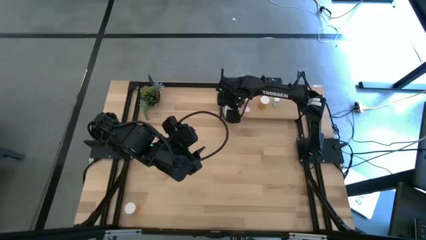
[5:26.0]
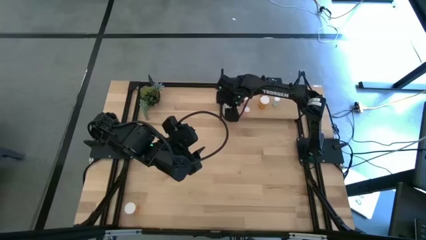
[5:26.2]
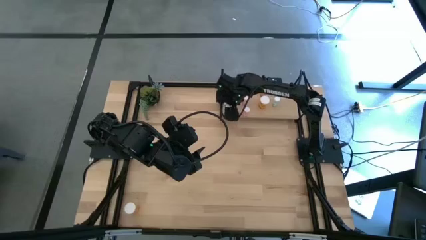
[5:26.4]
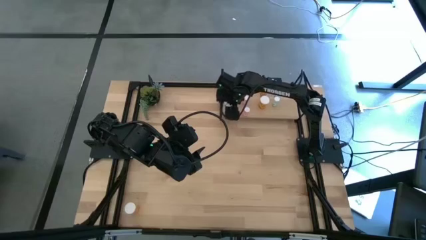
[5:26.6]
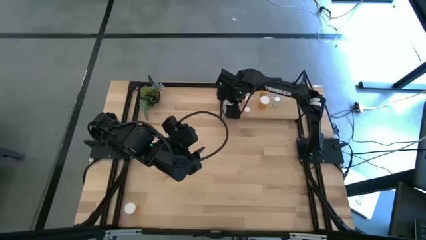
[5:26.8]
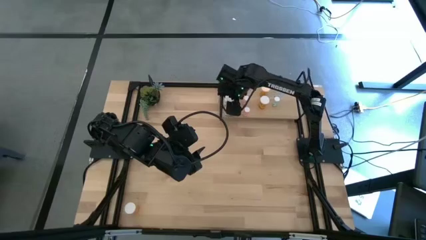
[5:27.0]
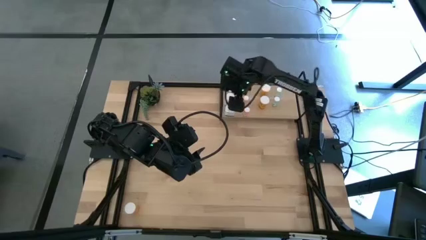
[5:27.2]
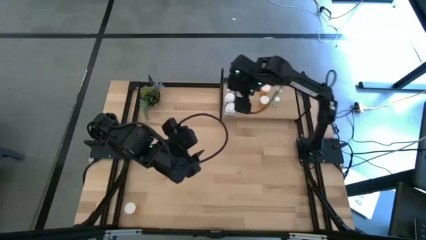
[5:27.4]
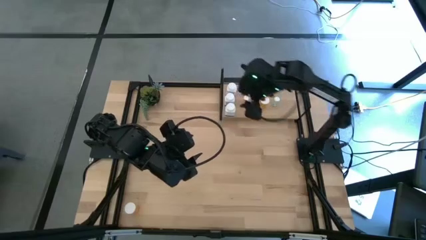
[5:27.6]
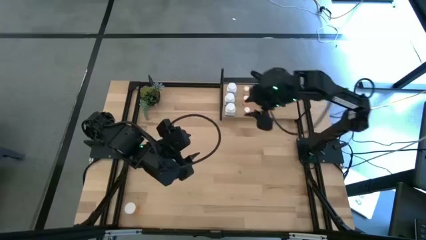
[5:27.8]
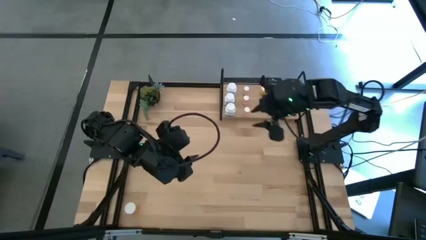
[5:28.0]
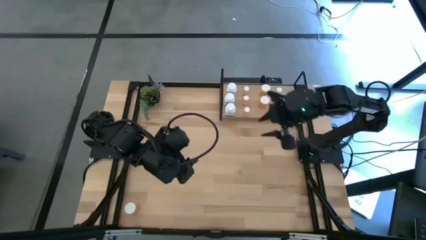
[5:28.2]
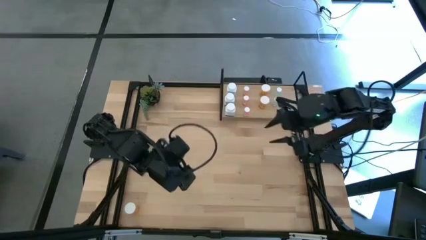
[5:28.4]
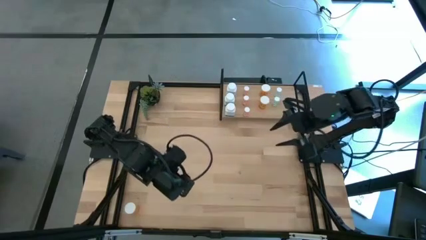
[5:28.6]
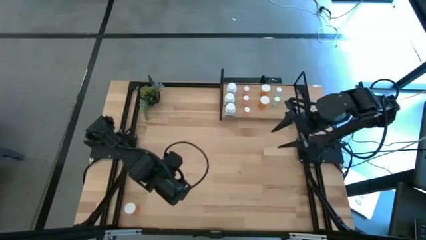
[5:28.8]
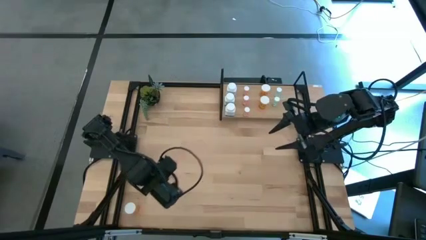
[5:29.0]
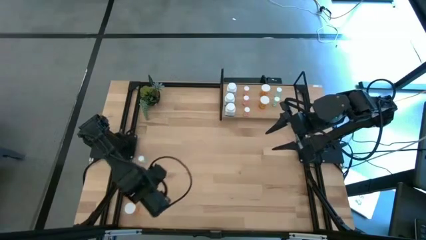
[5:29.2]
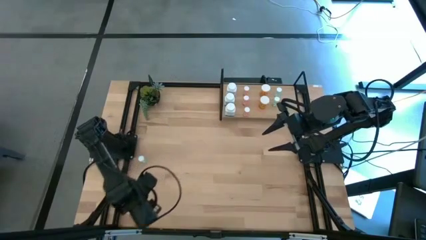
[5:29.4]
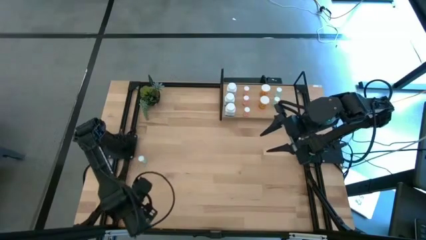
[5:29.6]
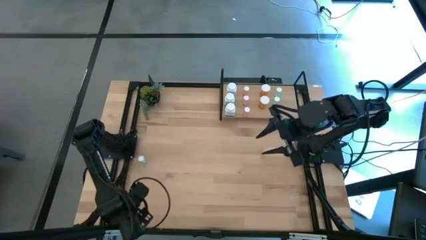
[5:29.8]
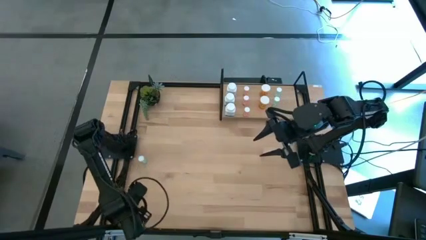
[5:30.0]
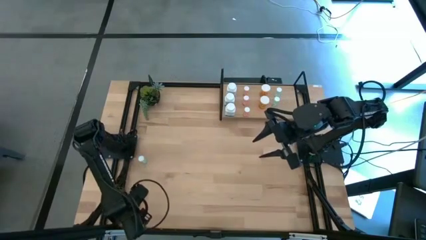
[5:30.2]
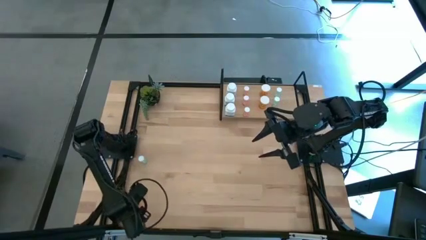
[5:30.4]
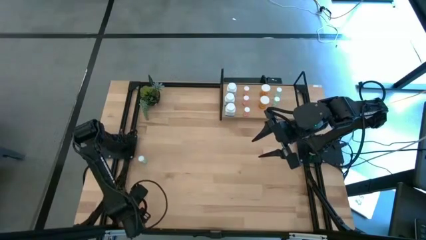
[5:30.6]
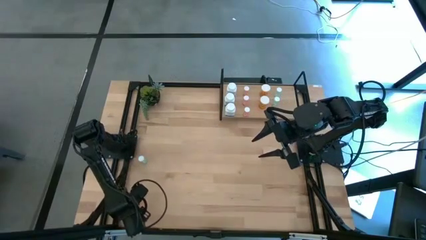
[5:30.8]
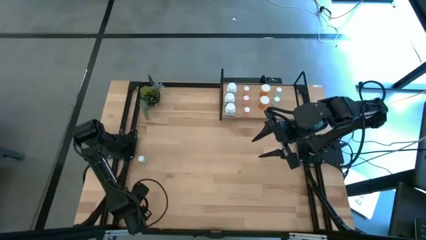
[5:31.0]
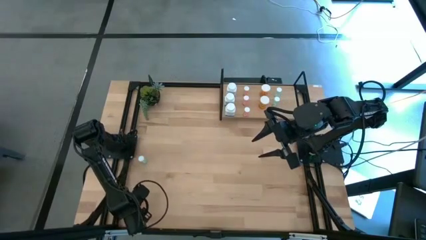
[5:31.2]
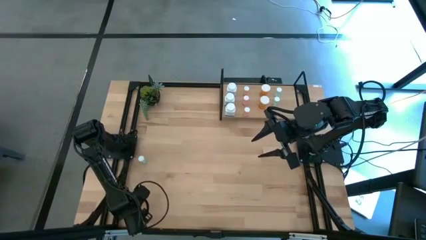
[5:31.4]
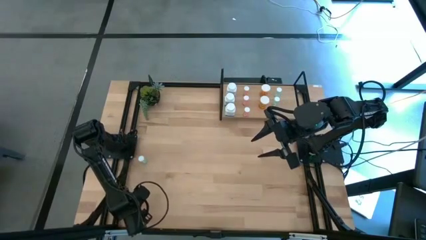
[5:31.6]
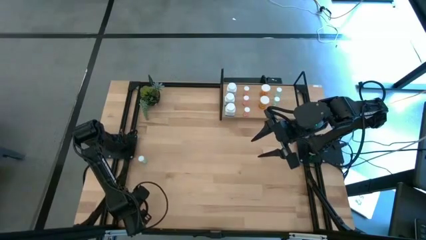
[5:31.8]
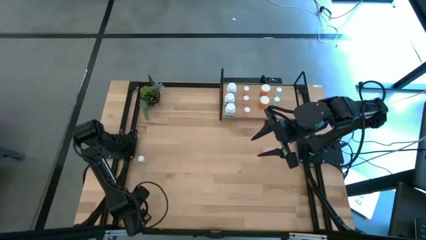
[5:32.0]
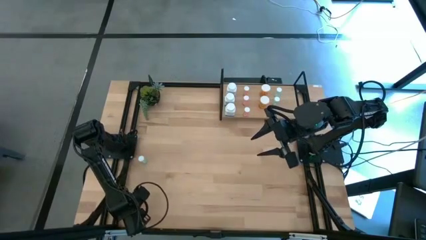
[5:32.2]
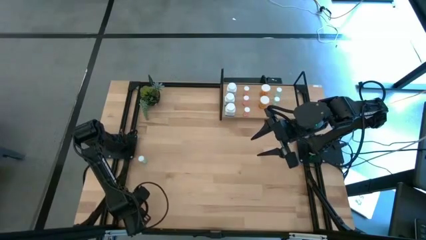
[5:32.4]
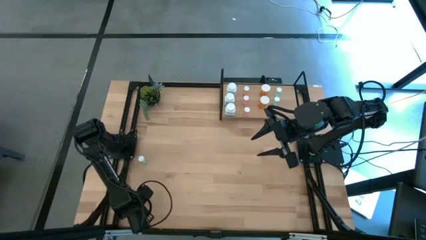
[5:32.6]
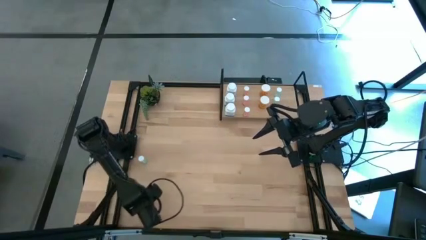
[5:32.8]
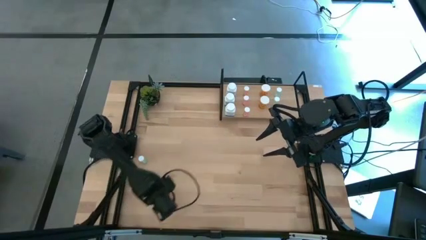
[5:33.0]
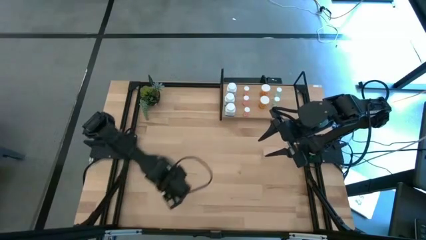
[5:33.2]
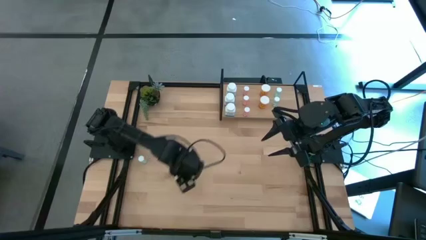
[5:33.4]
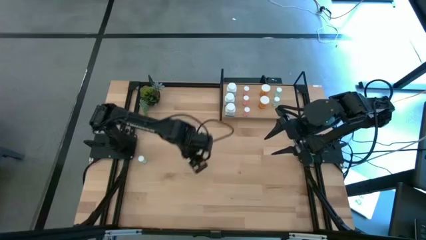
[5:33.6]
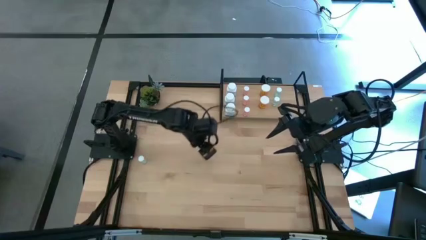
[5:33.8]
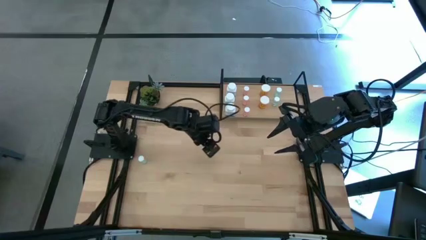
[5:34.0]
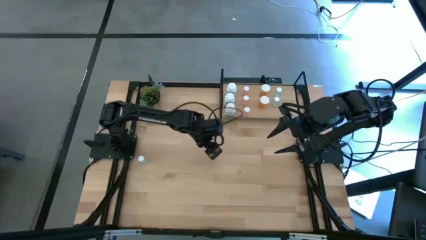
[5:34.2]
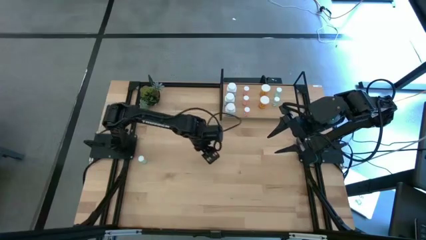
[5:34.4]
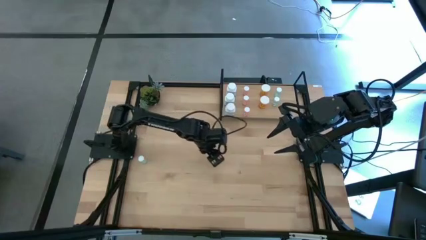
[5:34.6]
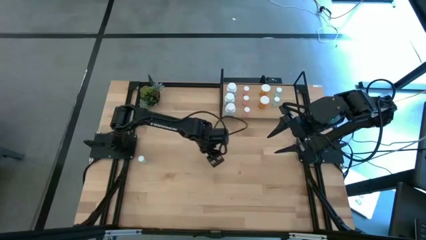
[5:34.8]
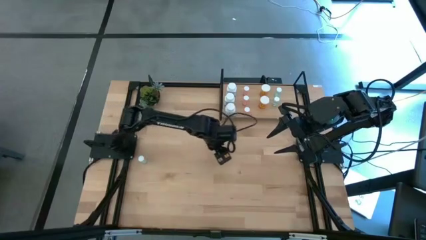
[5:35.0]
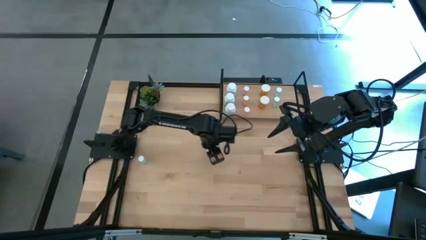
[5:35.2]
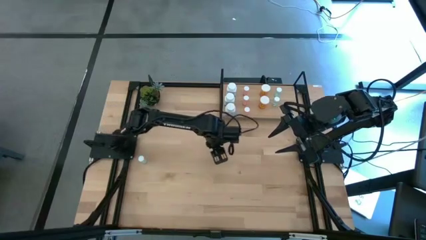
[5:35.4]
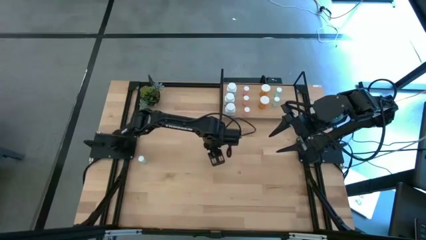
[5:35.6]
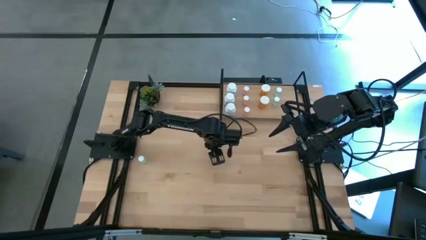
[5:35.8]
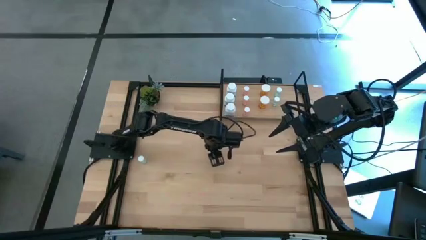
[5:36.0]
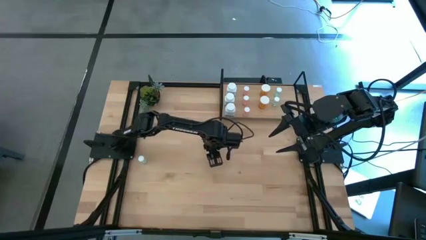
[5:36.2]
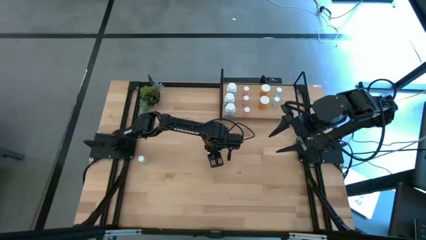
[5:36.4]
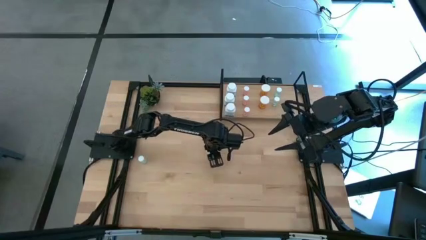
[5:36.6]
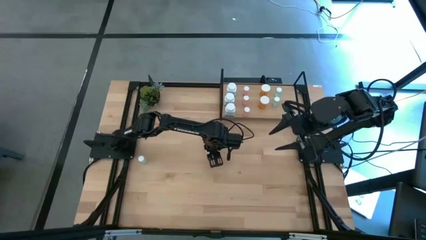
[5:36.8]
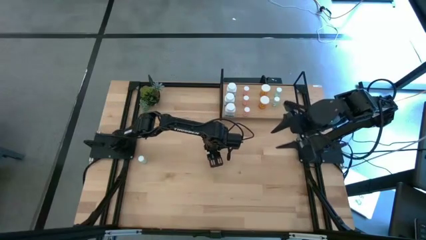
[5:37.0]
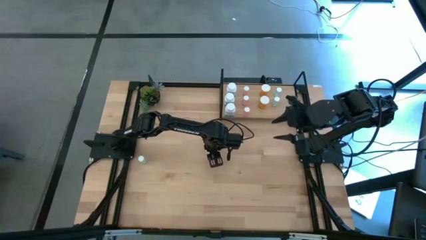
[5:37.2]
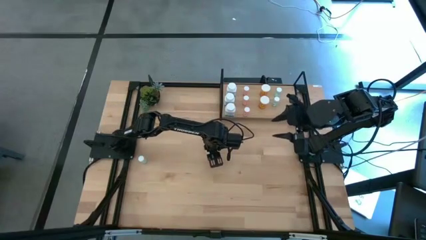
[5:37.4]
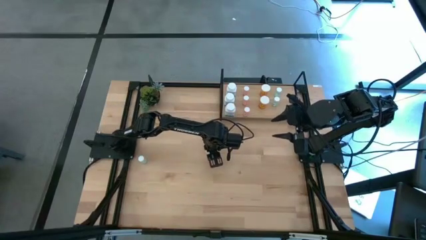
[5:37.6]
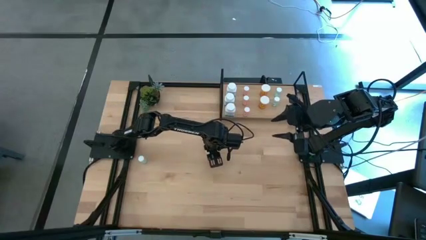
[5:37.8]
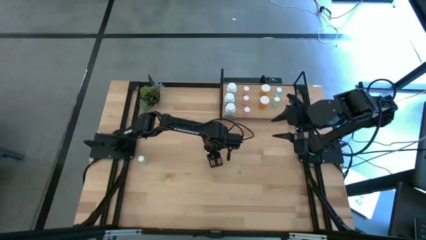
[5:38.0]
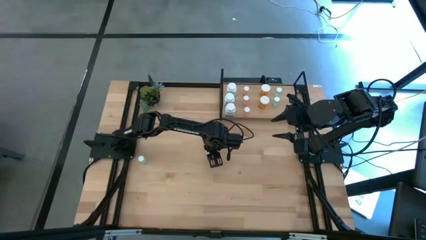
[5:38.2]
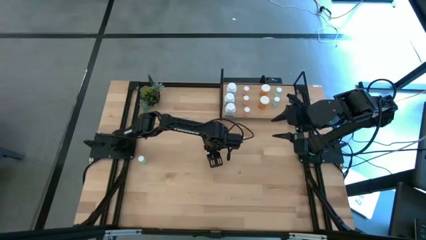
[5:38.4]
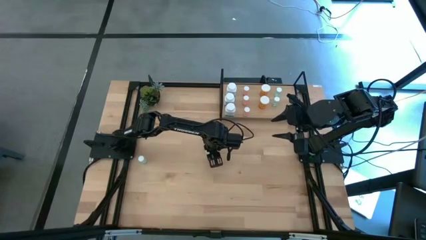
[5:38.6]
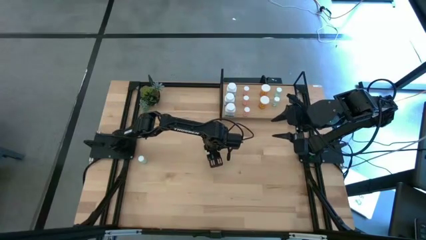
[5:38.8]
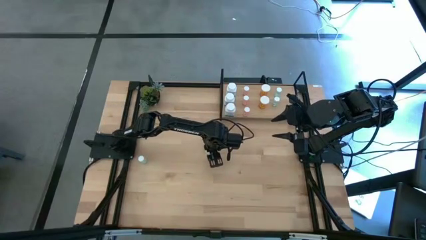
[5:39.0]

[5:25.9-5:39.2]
Task: Pick and place medicine bottles onto shelf by color
Move the orange pill bottle to the center of the table

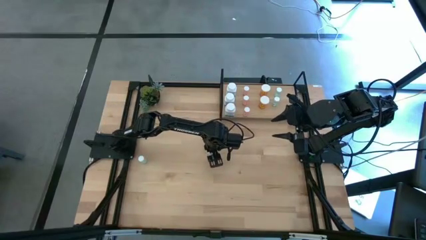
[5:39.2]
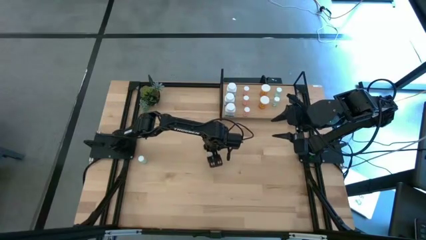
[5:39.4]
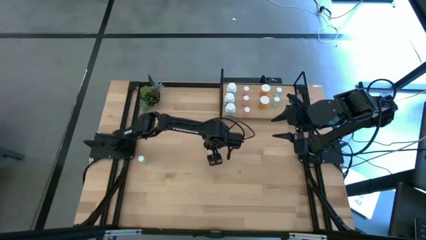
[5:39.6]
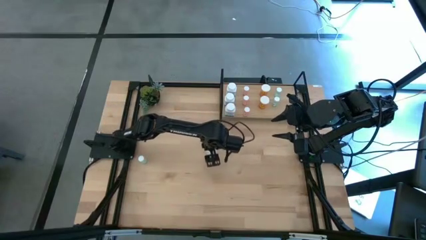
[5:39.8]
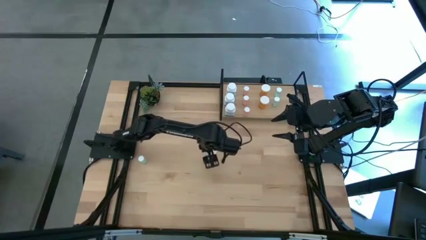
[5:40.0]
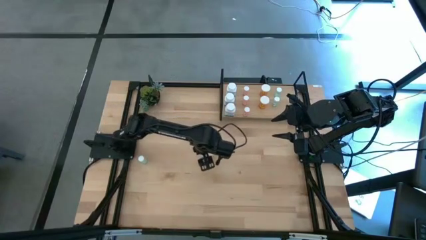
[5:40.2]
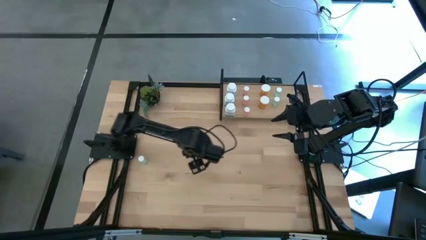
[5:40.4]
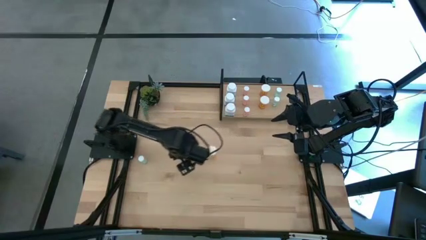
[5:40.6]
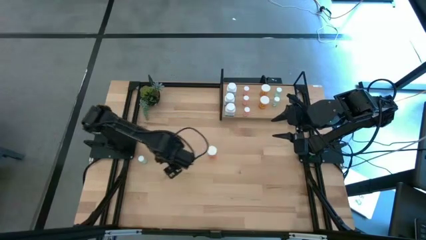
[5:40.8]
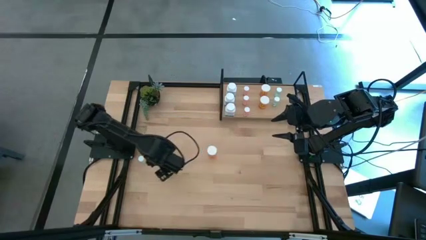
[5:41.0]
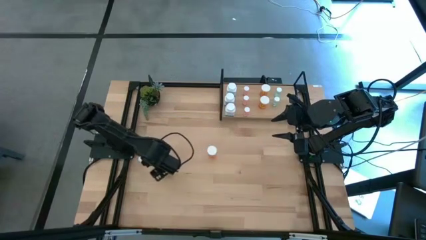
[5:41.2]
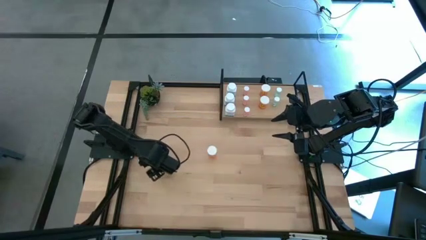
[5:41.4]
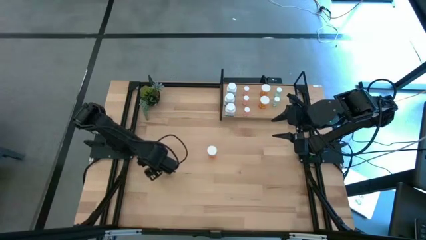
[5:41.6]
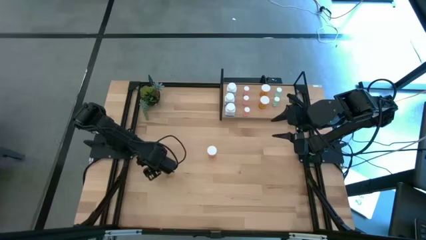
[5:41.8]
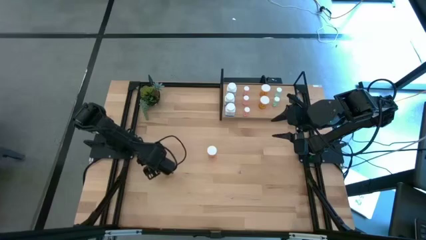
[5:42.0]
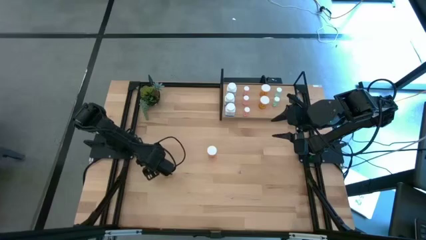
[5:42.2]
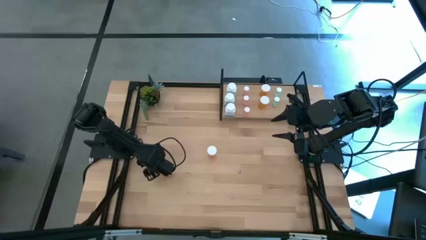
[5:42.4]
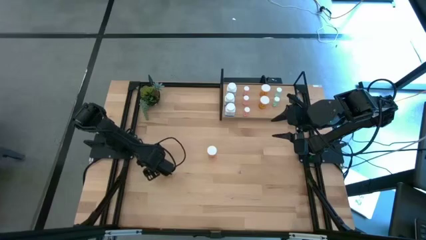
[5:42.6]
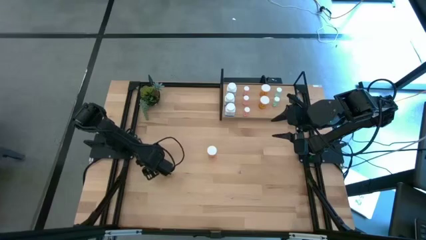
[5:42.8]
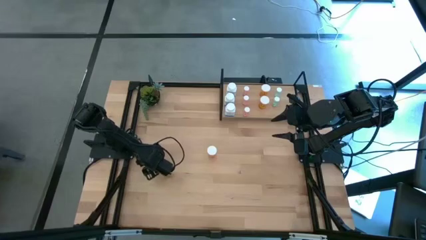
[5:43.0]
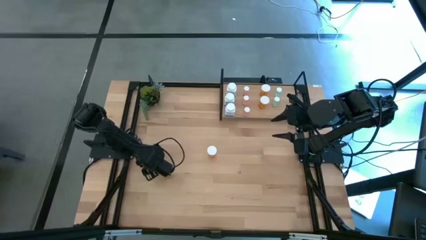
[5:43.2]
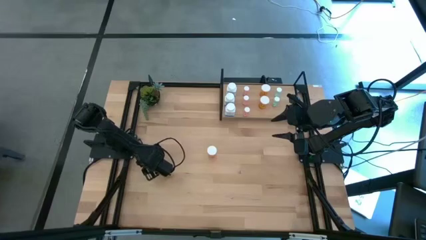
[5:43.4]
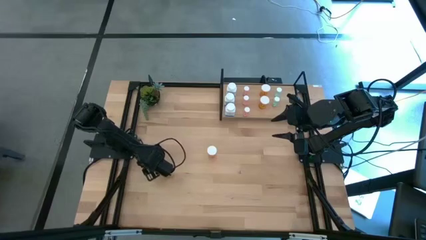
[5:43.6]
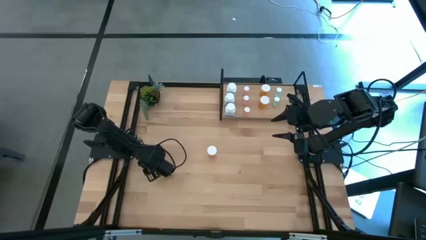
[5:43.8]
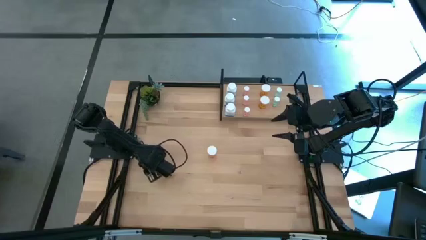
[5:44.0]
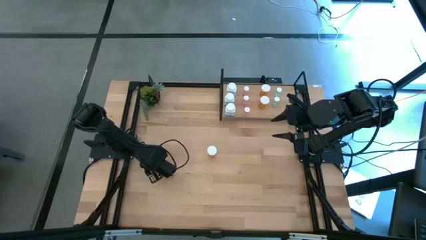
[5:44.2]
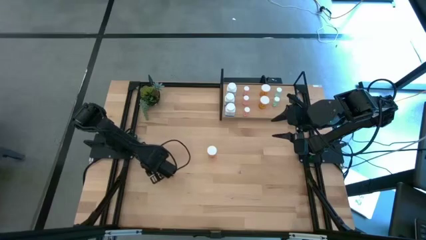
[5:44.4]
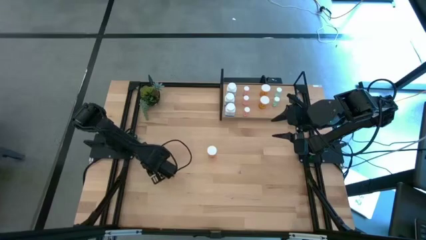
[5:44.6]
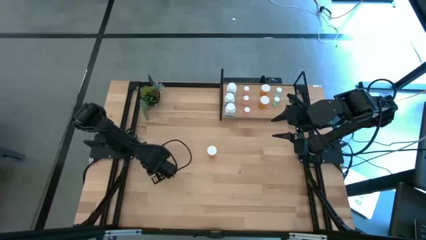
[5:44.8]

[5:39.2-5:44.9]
Move the blue pill bottle to the center of the table
